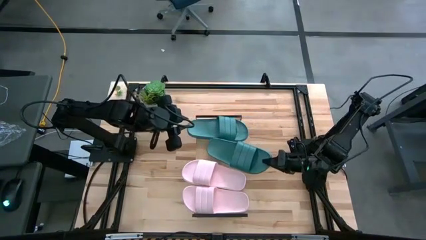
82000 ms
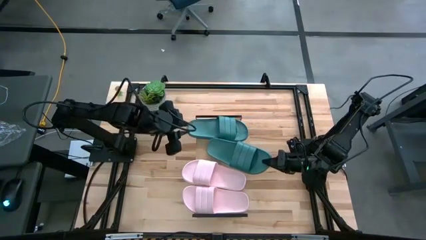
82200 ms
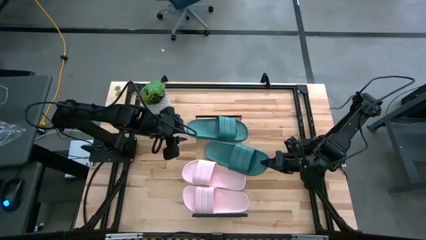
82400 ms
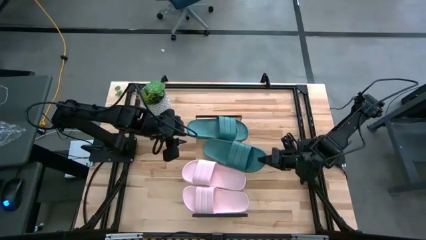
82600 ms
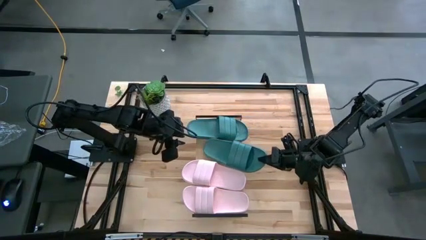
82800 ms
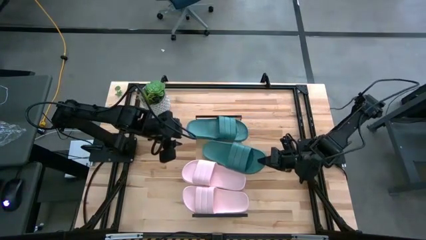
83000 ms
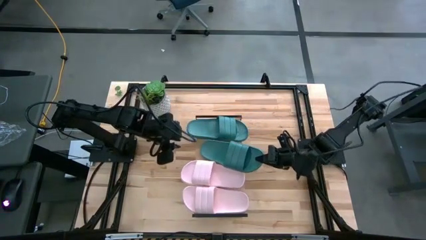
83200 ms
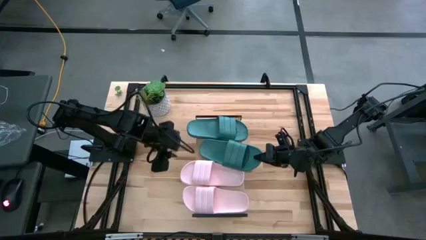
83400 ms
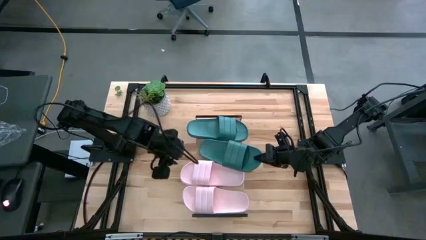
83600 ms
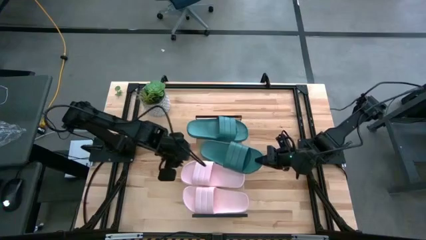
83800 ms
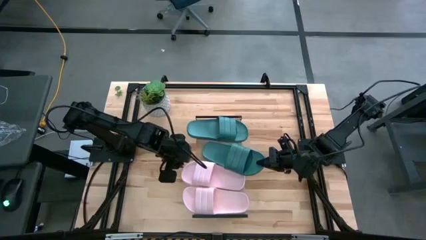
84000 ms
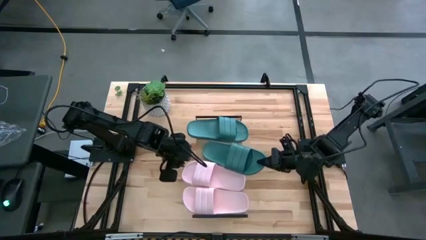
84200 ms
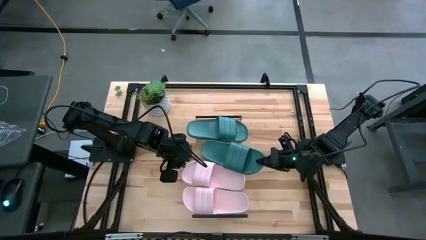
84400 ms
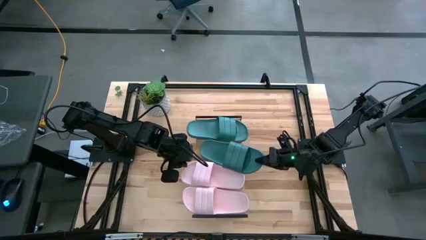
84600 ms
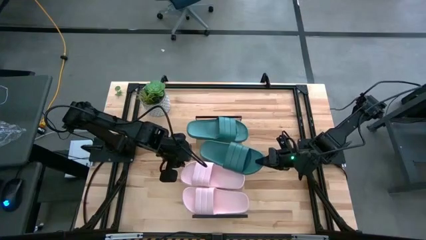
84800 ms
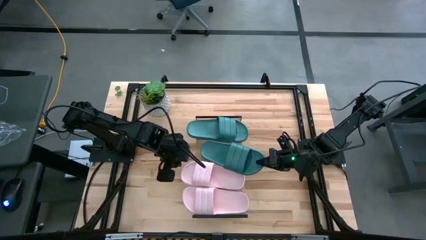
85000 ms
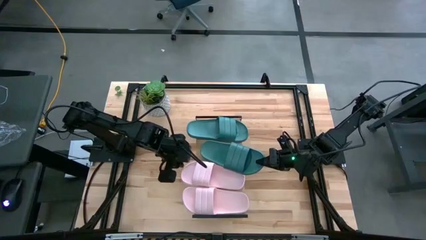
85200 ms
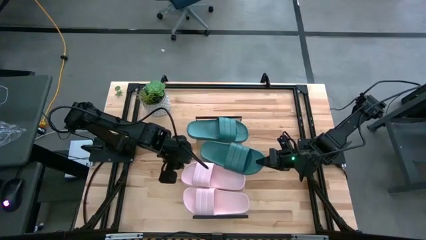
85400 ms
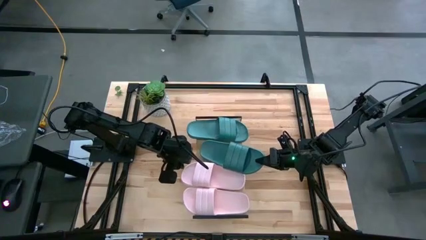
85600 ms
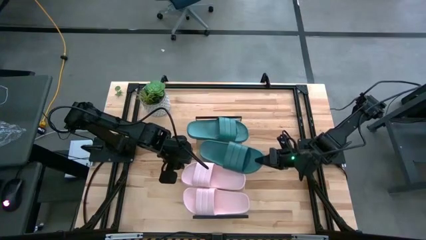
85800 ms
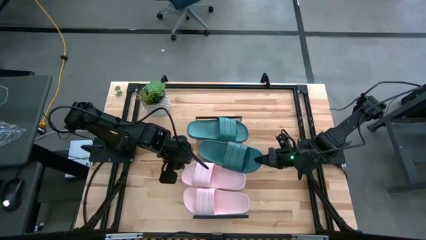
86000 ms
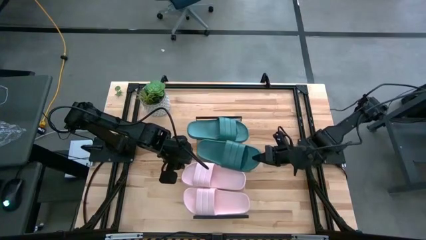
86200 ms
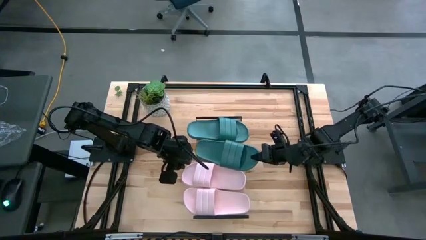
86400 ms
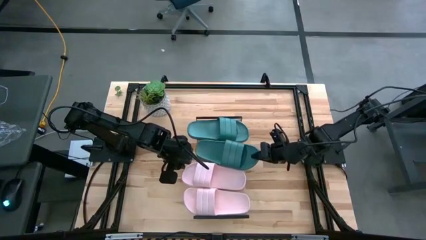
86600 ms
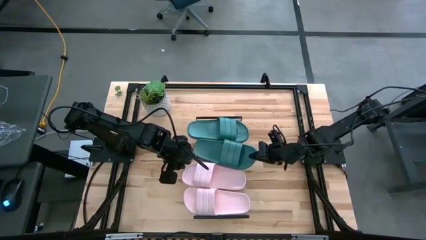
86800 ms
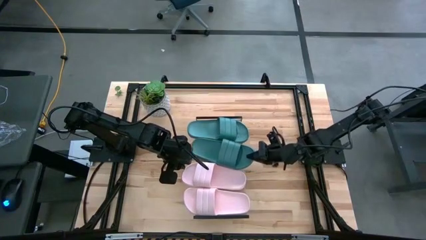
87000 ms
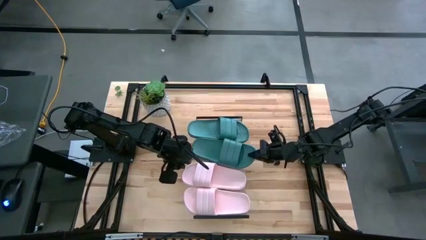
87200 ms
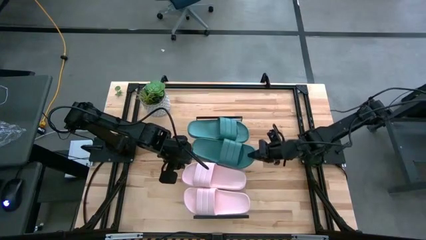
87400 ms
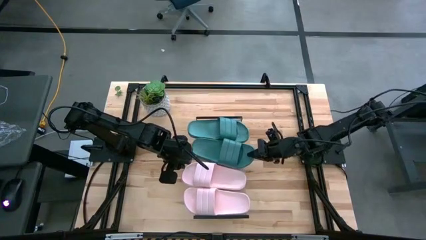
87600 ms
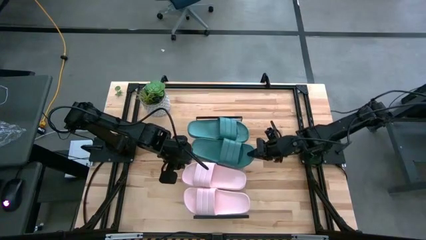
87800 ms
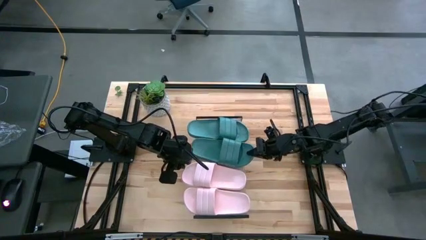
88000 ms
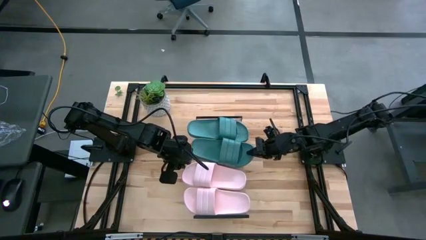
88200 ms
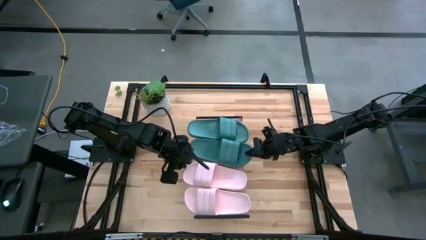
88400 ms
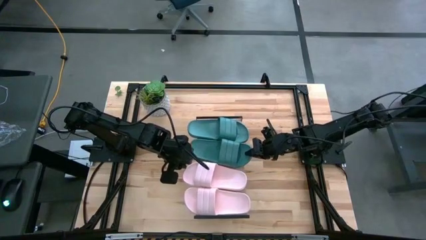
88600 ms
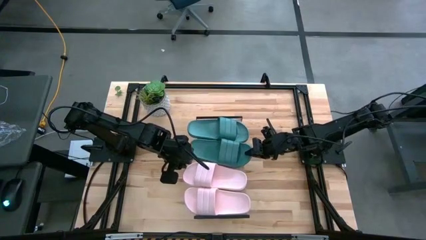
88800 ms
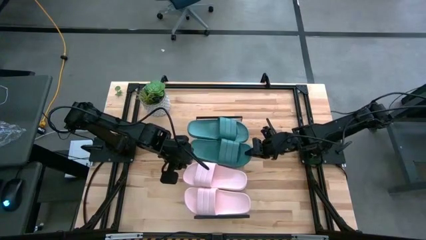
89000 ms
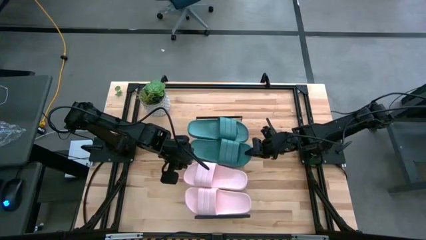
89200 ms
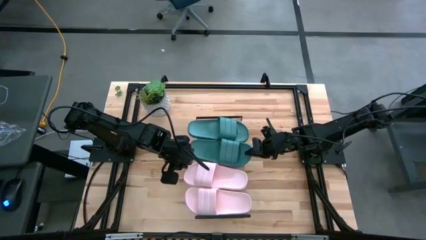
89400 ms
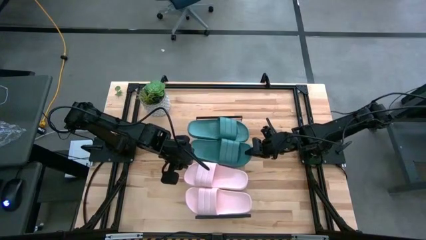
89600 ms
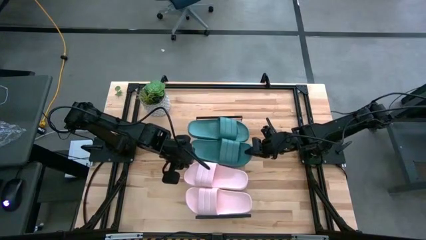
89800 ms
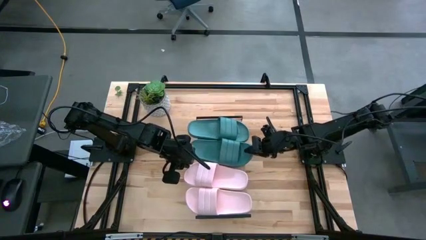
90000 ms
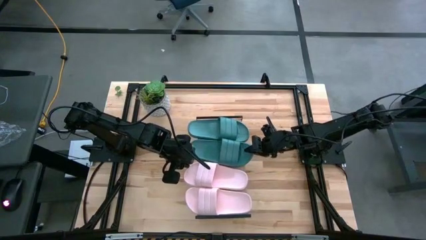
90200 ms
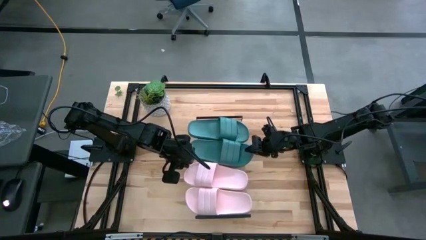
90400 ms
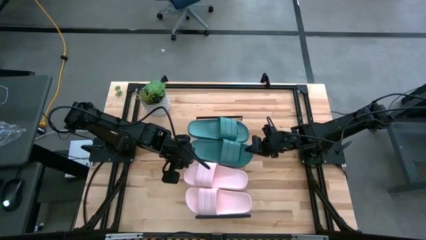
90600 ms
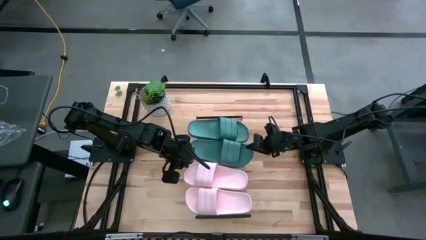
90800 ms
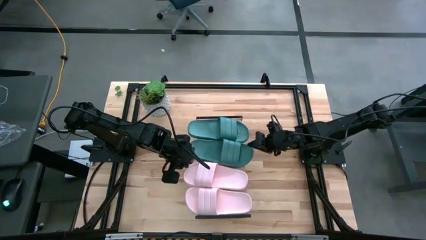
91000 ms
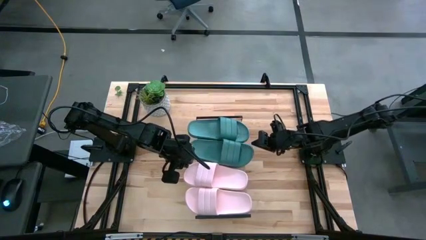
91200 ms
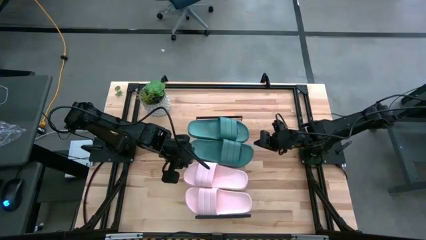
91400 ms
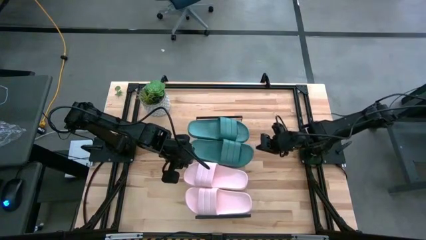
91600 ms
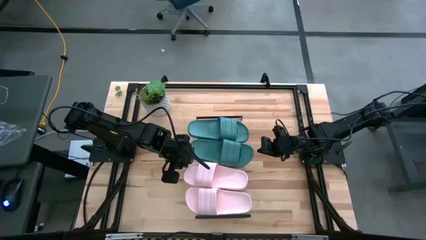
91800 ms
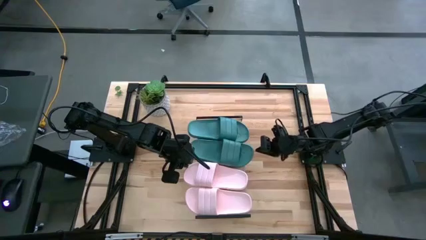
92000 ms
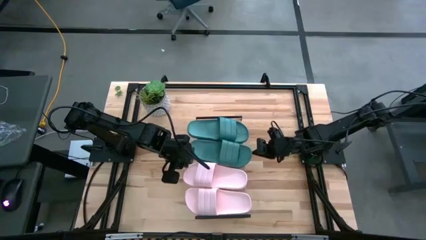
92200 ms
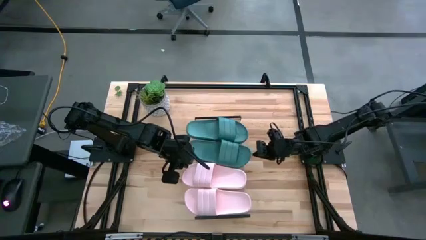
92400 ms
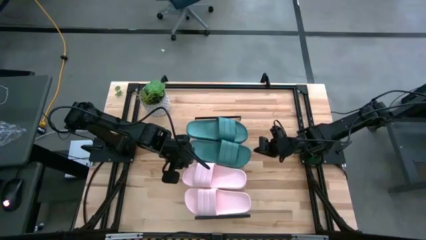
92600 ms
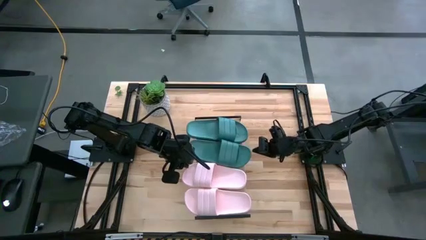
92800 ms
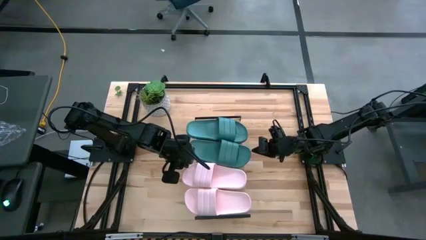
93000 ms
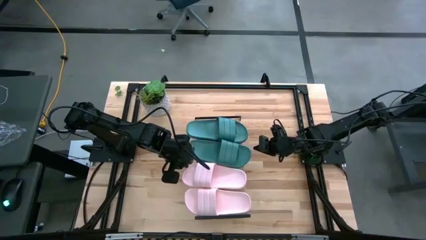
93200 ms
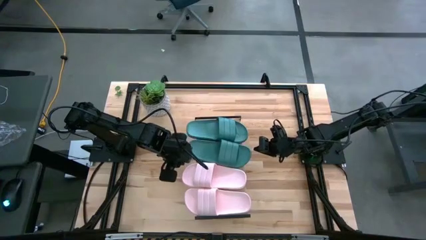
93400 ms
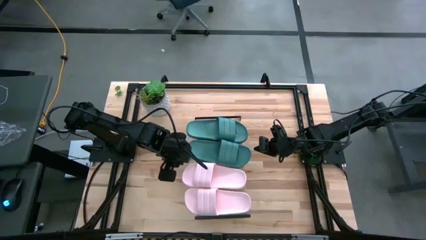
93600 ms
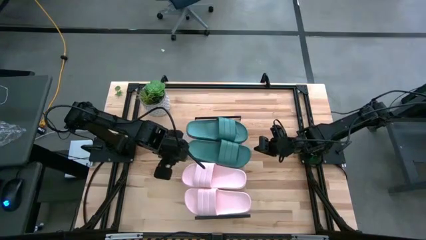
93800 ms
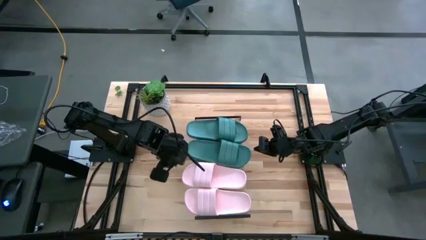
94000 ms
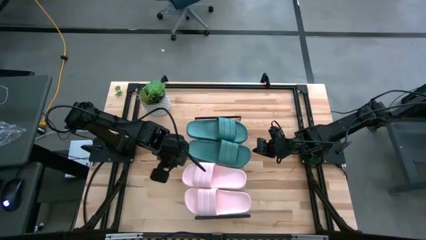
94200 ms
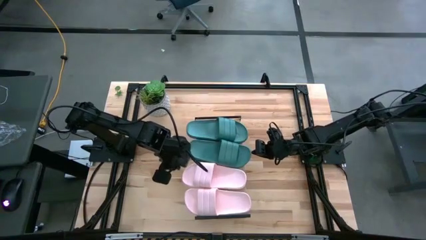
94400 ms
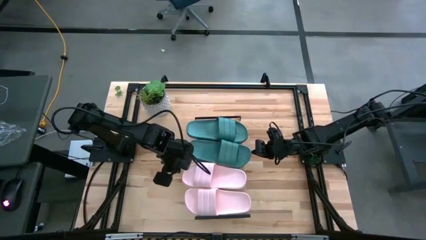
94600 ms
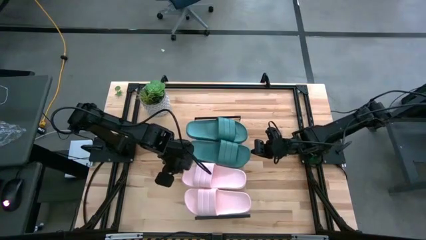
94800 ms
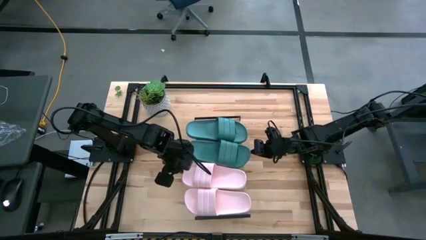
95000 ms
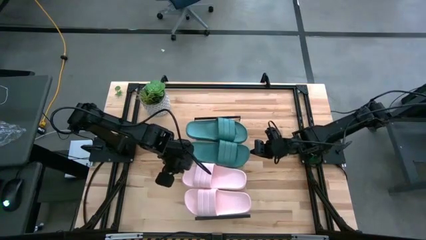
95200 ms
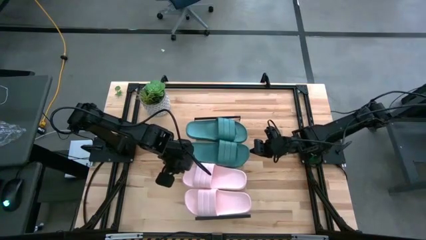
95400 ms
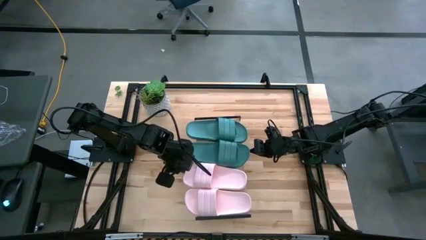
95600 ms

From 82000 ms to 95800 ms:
Task: Pick and place slides into the shelf
Put the green slides on the shelf
